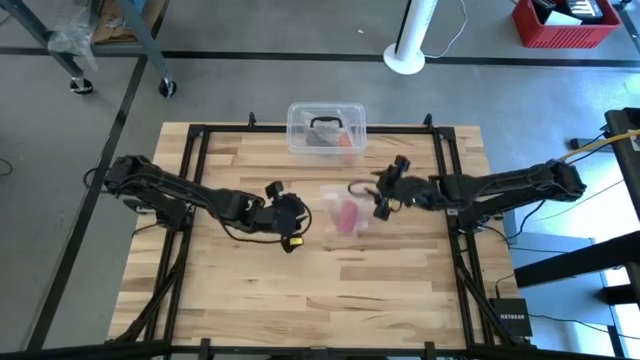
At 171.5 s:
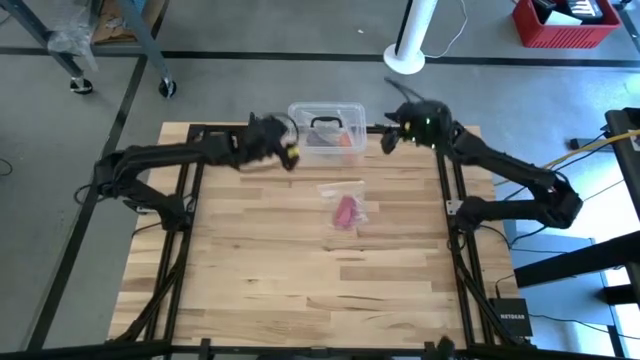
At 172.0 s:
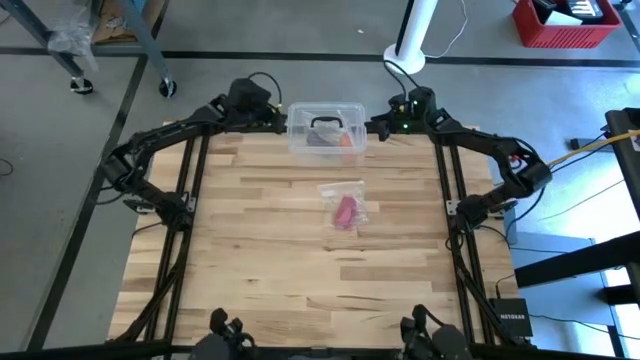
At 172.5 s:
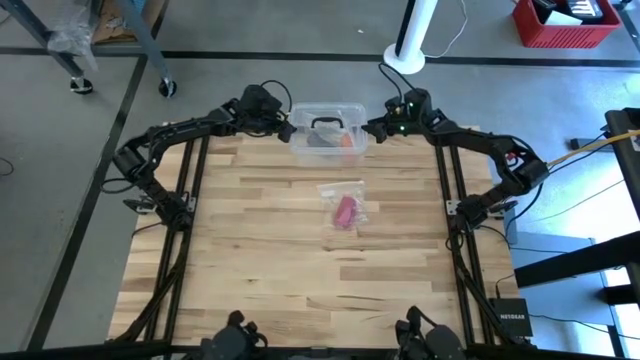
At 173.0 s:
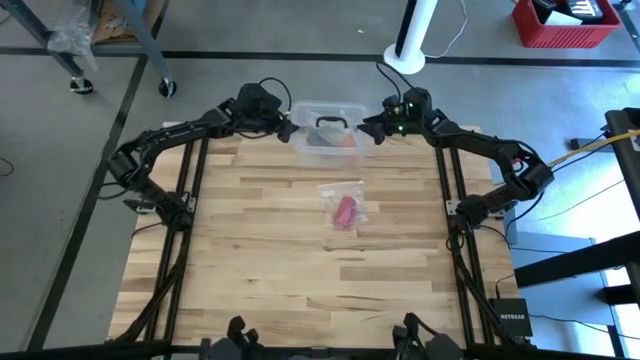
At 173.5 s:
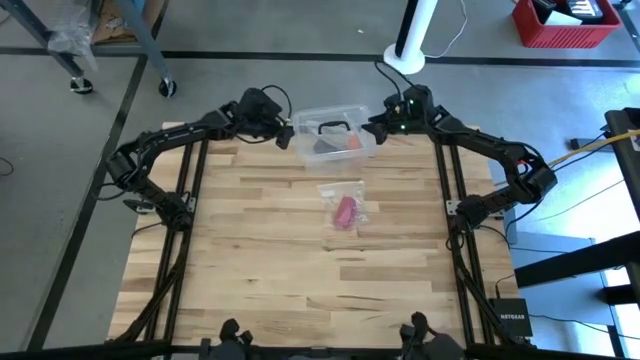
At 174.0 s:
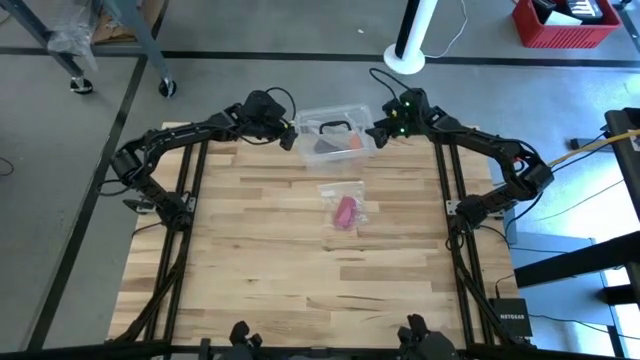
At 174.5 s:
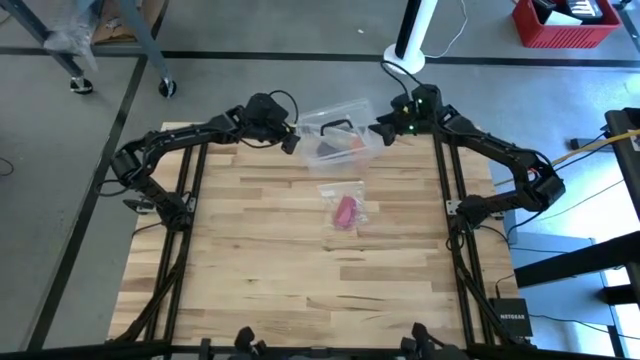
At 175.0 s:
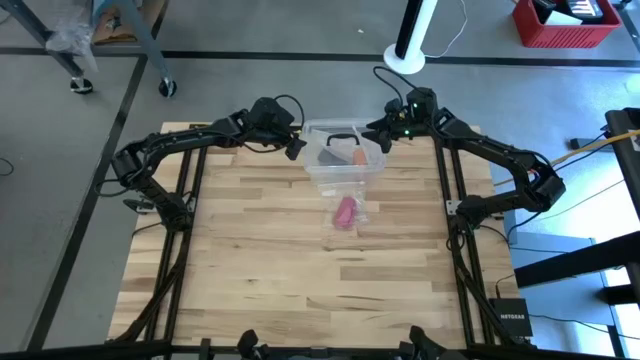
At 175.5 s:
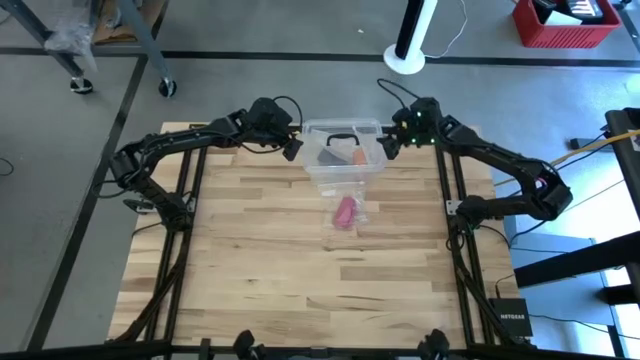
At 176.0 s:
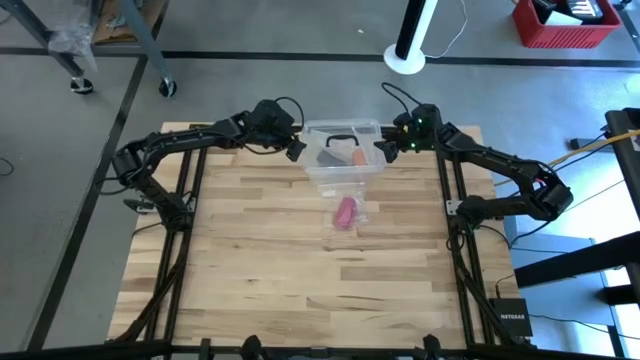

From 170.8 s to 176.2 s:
Task: Roll bandage
Open the transparent bin

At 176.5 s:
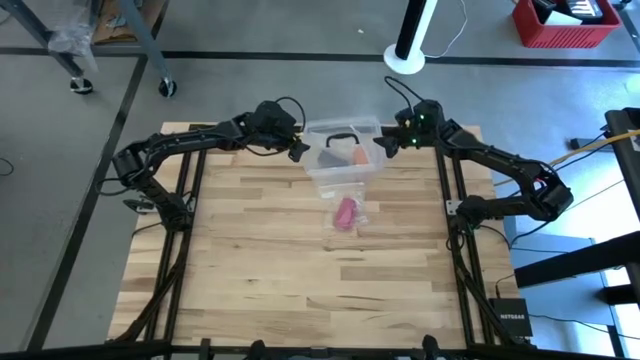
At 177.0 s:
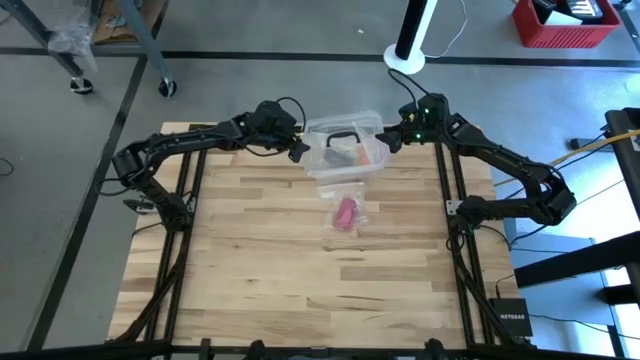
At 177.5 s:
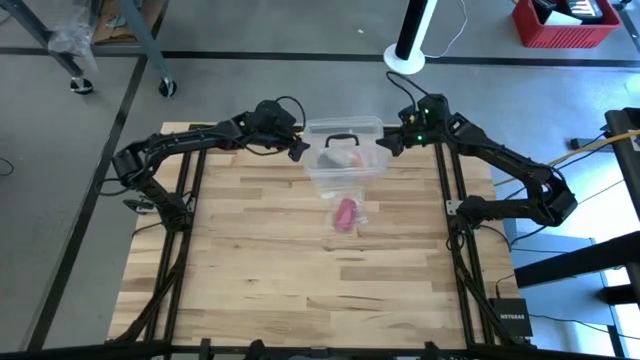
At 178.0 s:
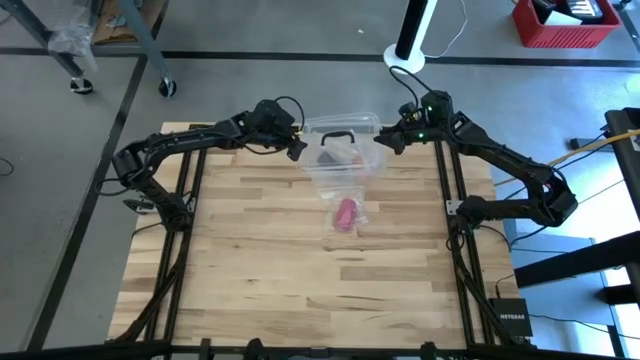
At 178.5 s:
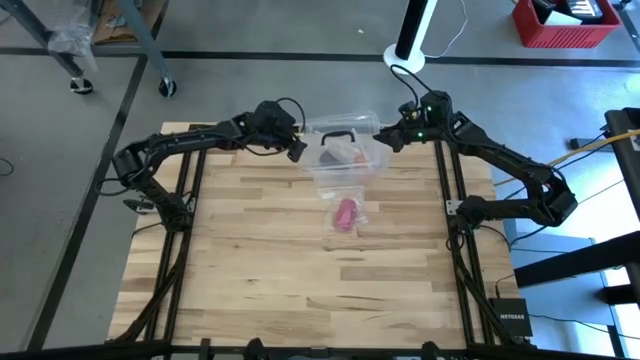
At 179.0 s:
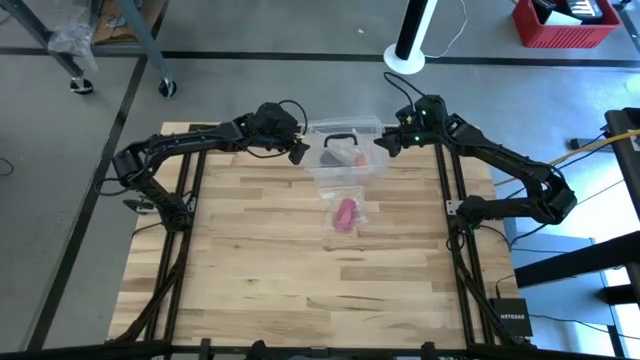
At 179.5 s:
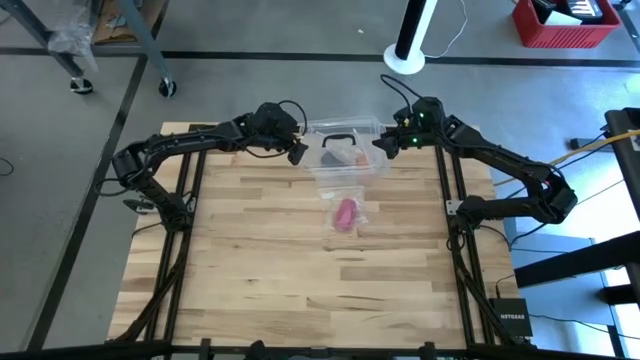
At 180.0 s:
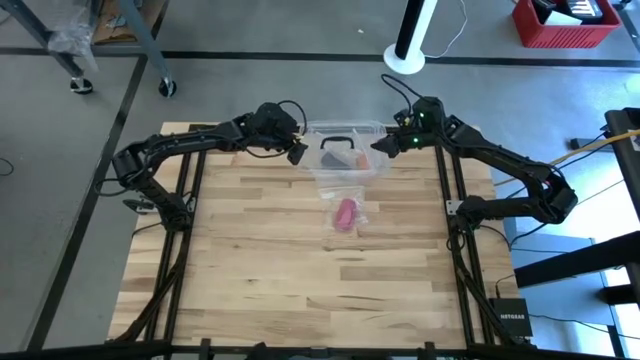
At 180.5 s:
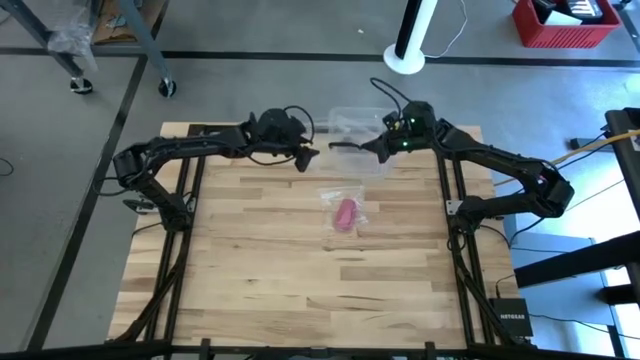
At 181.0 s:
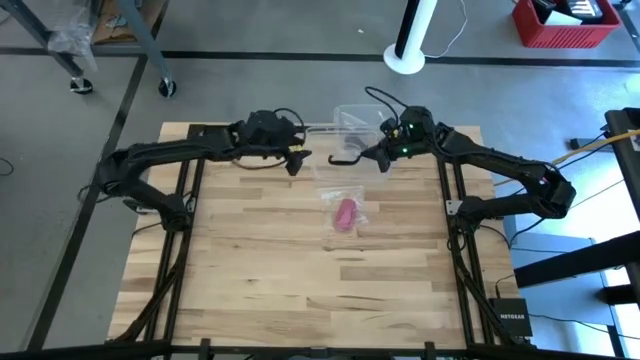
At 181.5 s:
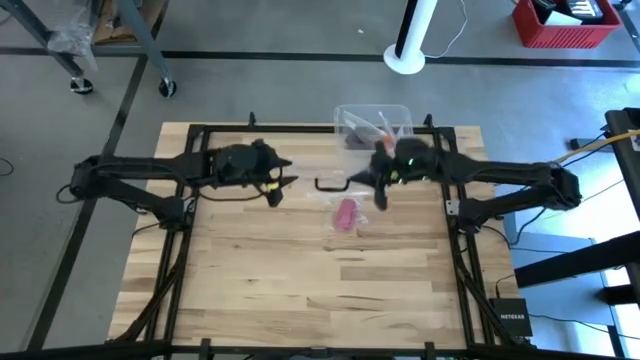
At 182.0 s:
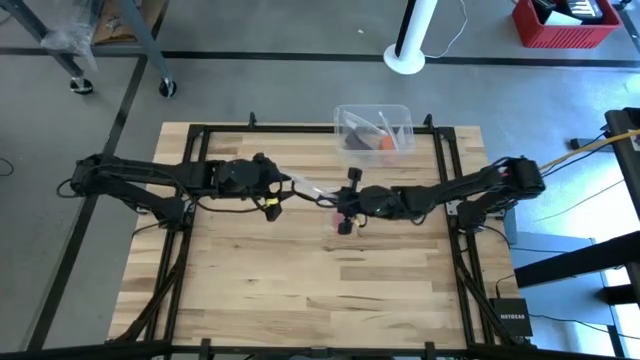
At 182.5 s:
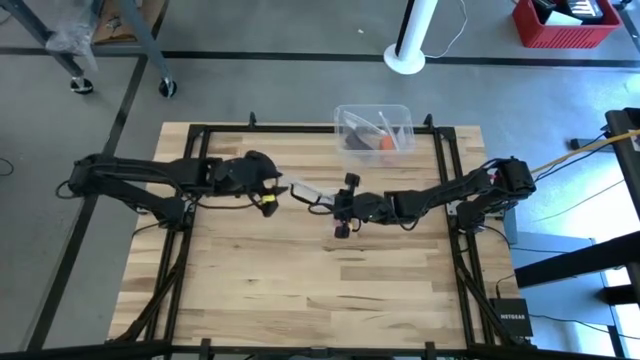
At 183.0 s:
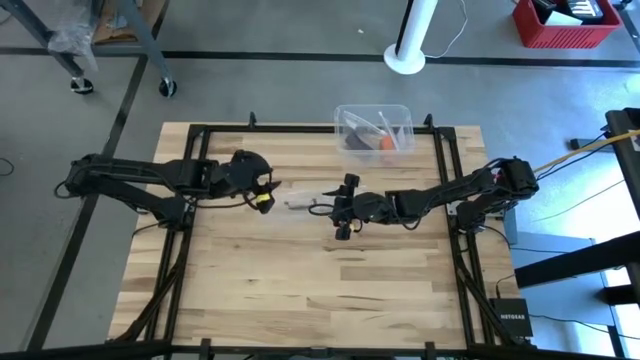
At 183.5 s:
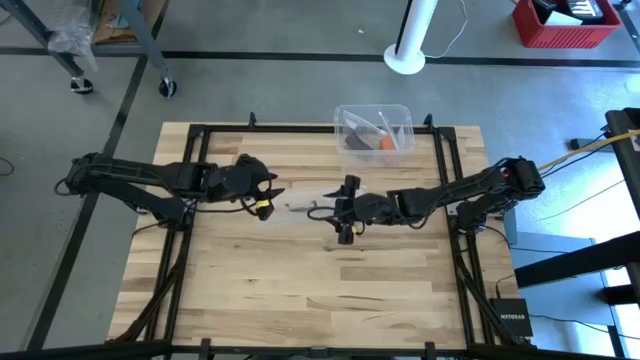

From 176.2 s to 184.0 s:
Open the transparent bin

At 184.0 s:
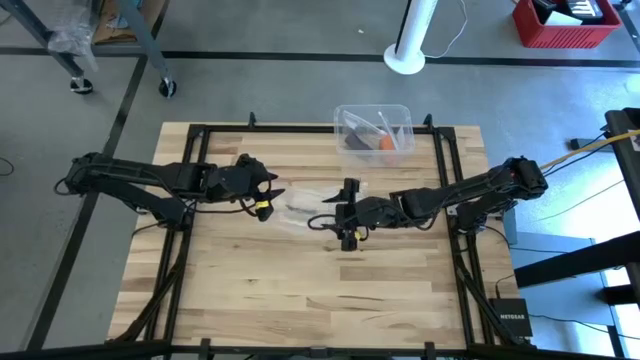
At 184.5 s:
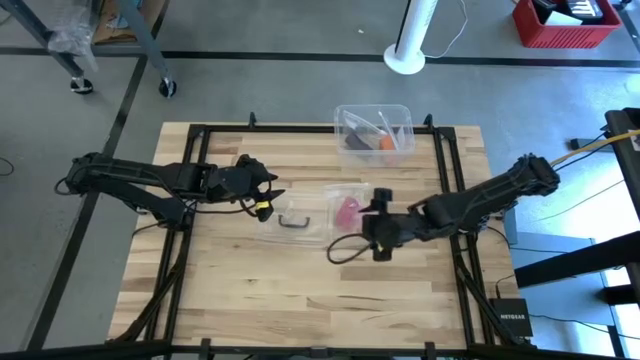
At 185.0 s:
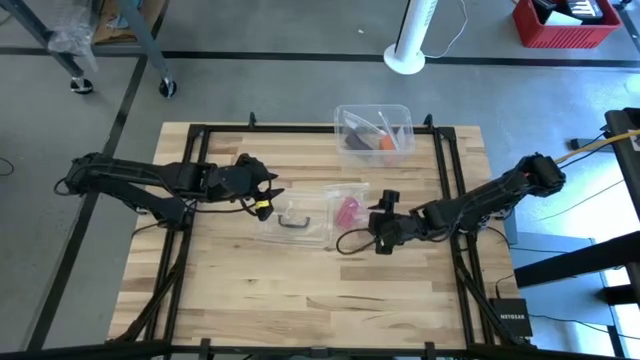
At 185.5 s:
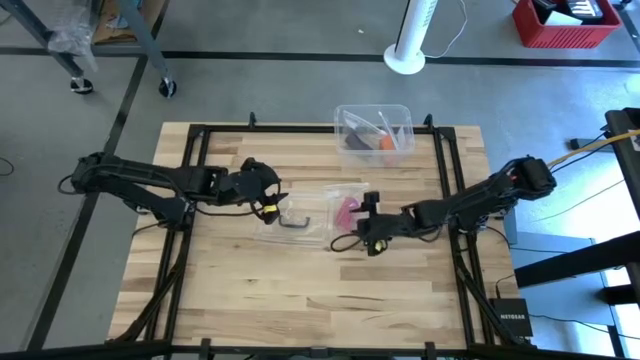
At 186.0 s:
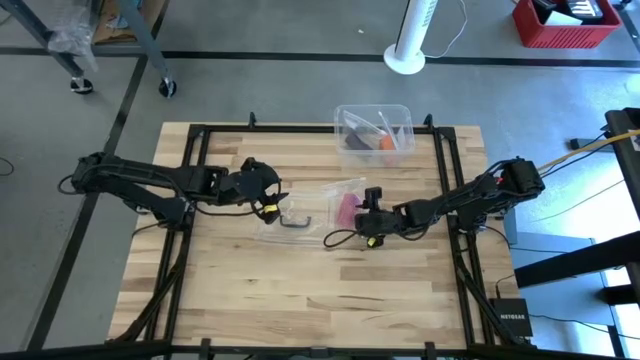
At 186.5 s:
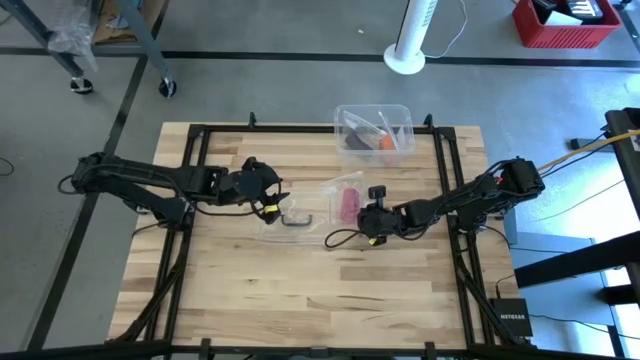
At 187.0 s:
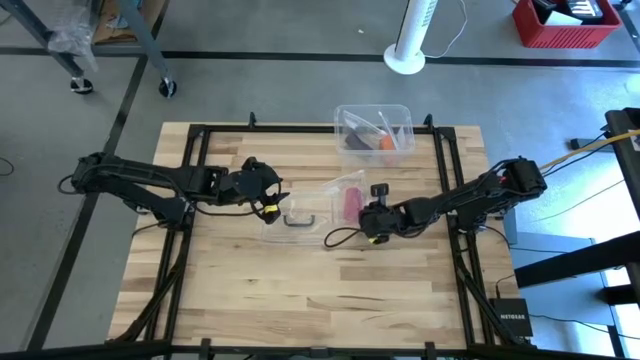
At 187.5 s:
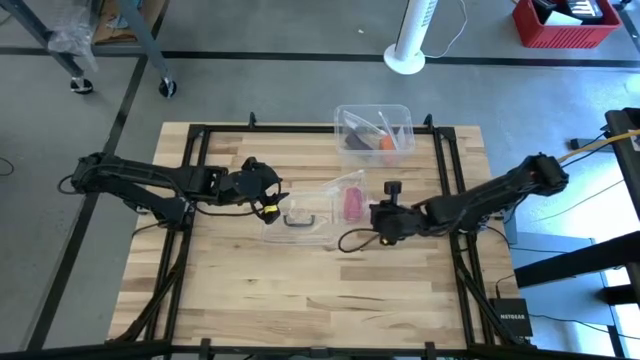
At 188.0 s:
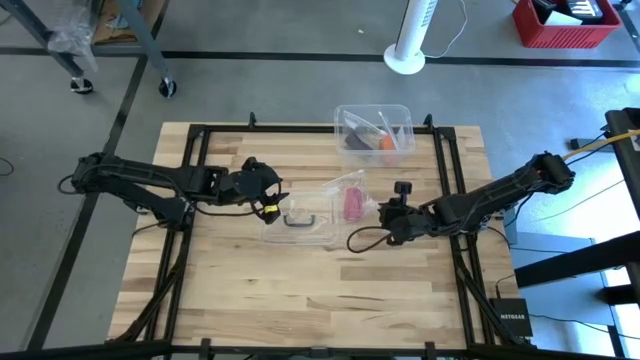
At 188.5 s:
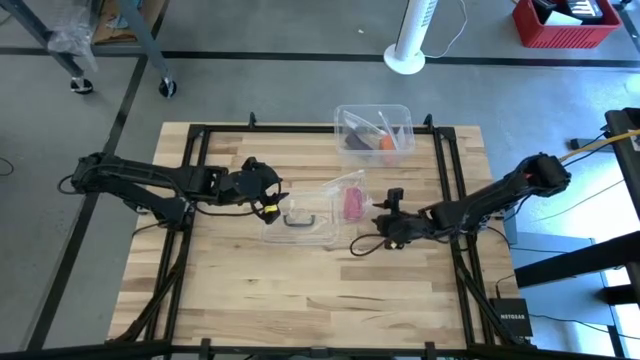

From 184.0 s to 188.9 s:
Put the transparent zip lock bag into the transparent bin

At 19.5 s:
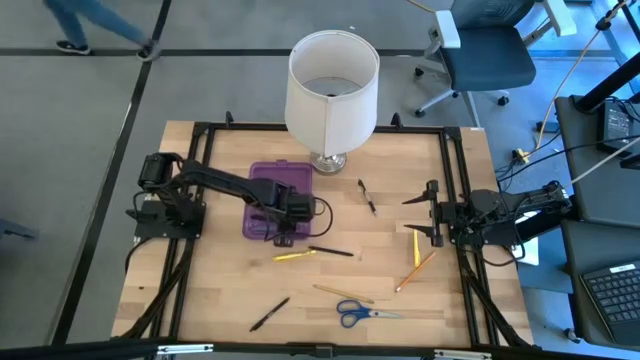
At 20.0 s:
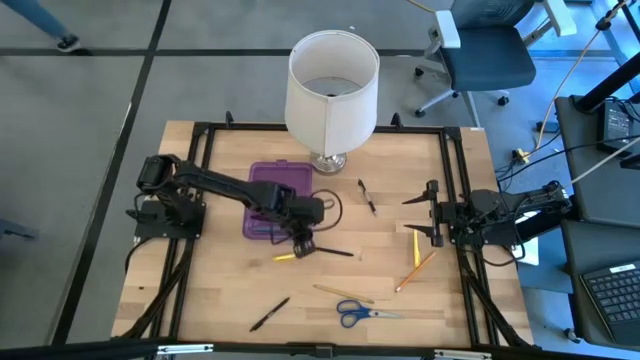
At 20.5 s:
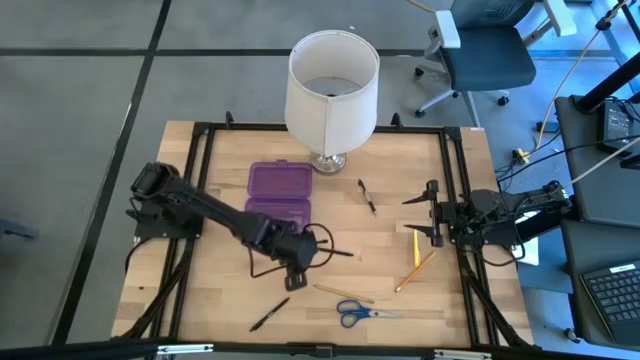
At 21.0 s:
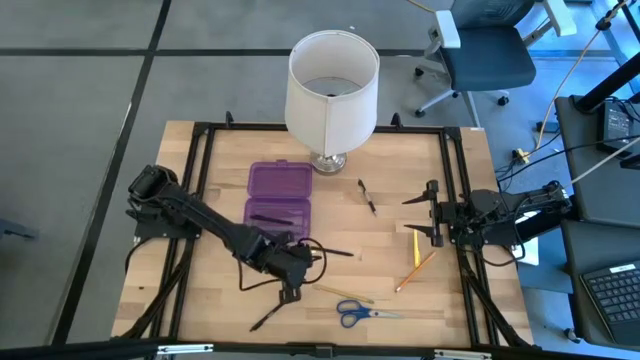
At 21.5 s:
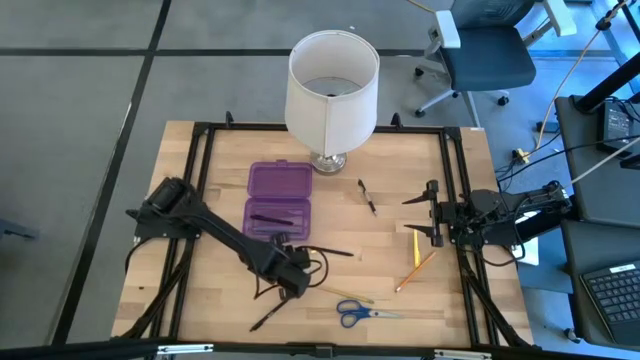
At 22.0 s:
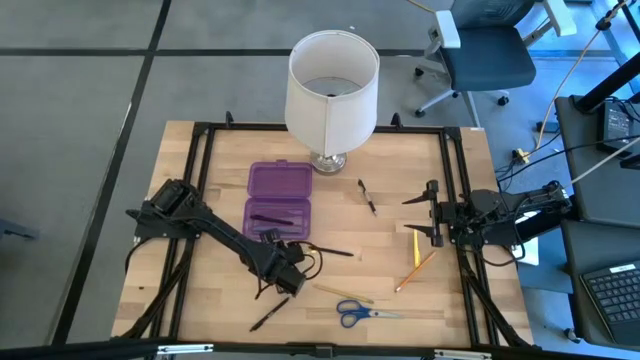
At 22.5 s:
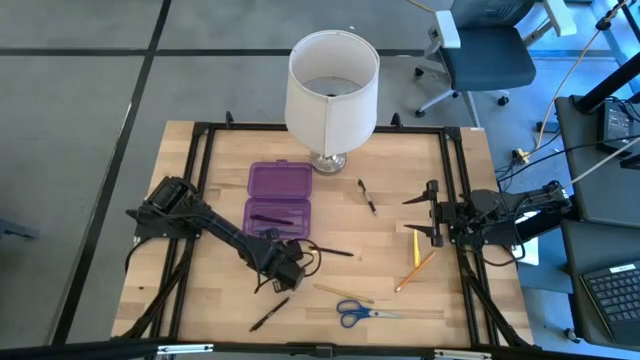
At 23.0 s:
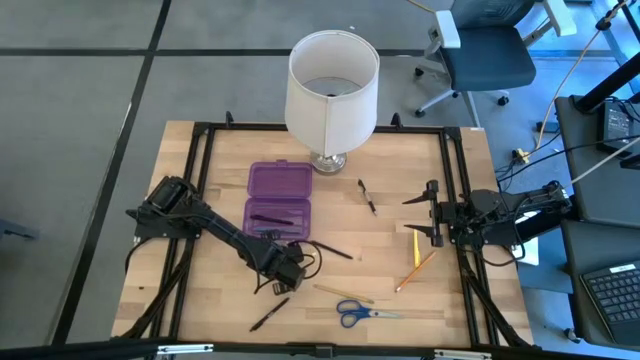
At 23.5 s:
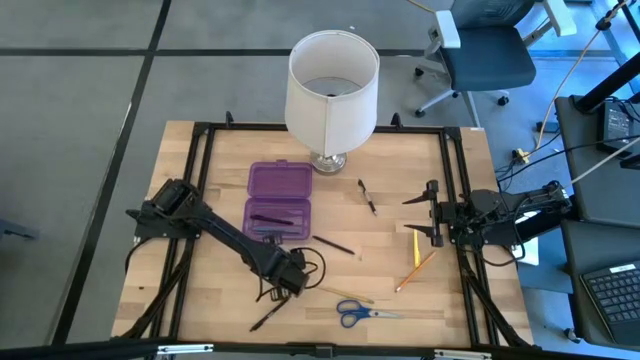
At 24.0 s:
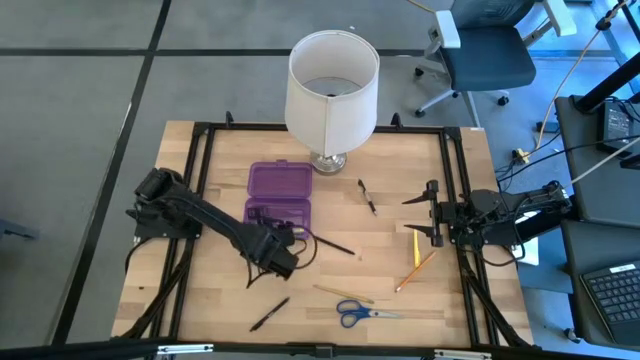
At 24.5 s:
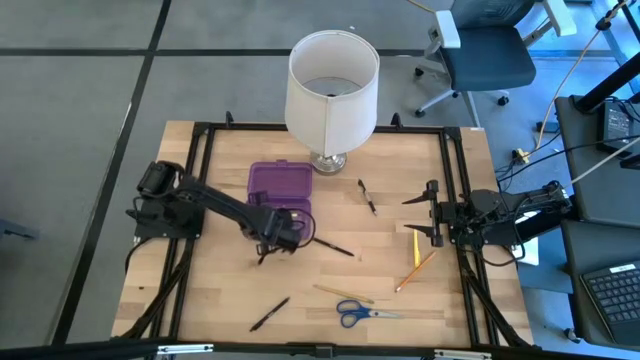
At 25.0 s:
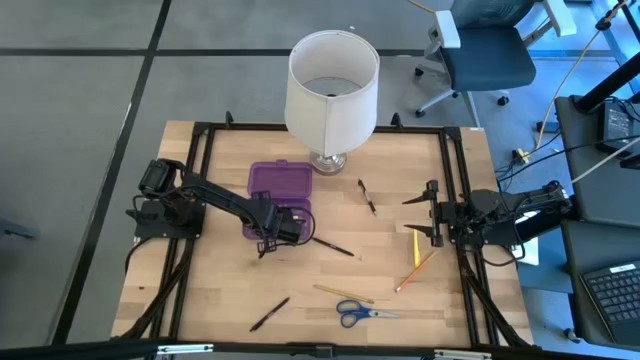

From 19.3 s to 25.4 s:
Task: Pick & place school supplies into a supply box
Put the left yellow pen into the purple supply box
